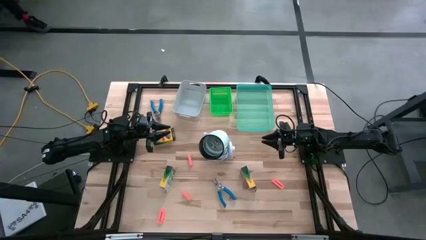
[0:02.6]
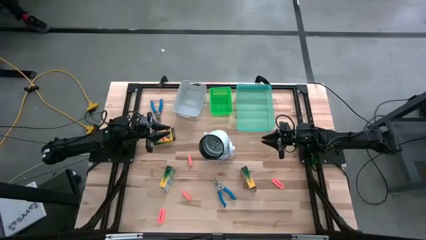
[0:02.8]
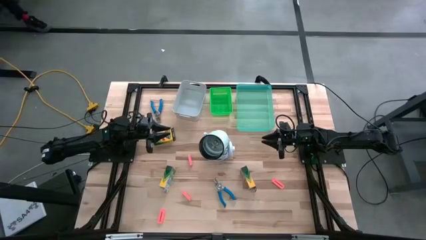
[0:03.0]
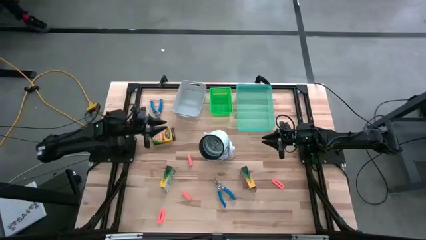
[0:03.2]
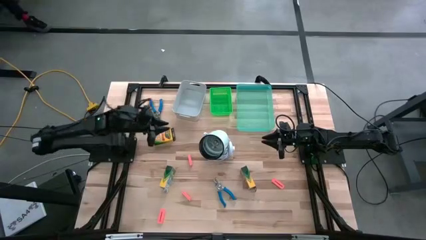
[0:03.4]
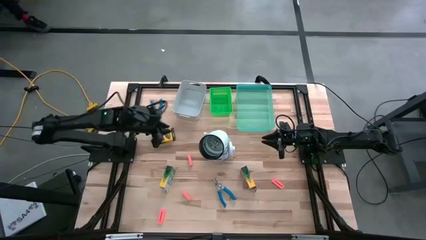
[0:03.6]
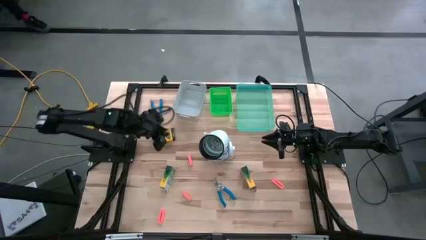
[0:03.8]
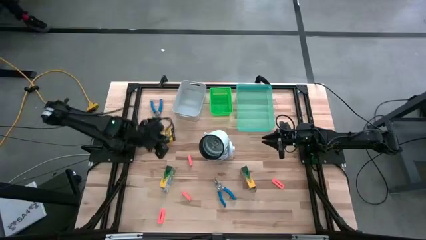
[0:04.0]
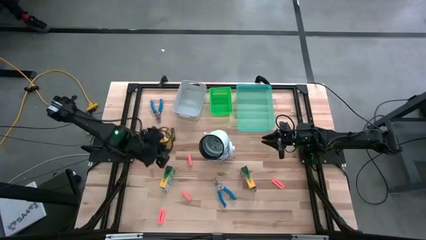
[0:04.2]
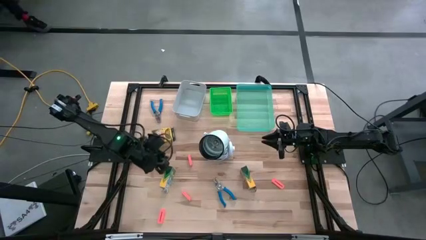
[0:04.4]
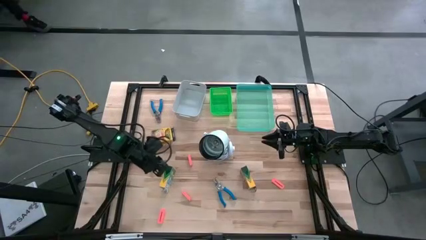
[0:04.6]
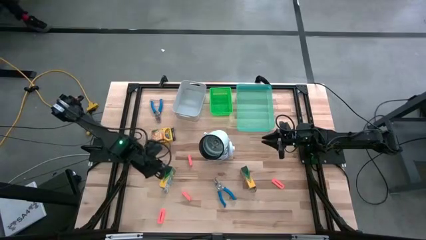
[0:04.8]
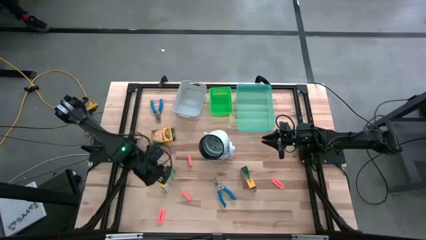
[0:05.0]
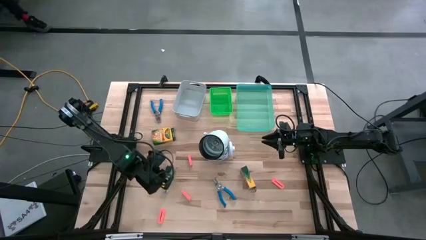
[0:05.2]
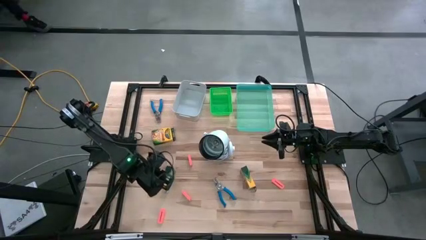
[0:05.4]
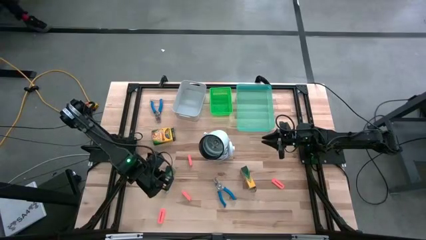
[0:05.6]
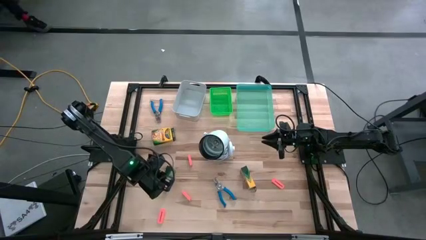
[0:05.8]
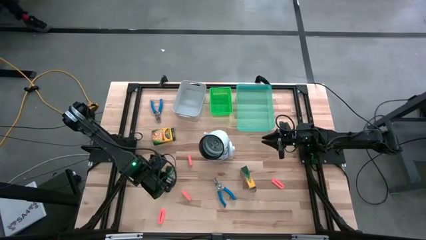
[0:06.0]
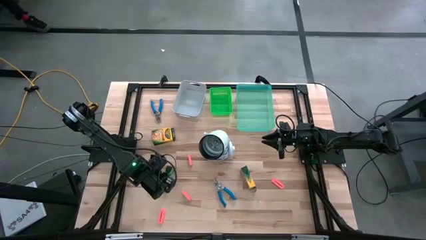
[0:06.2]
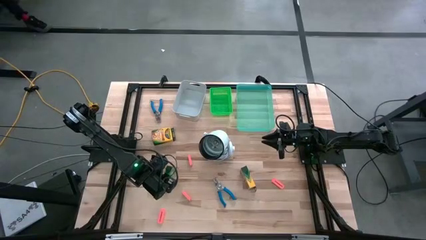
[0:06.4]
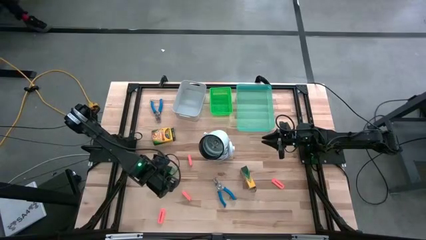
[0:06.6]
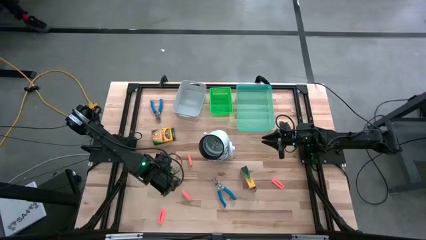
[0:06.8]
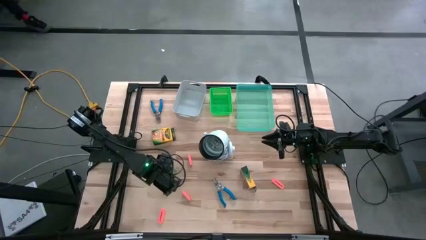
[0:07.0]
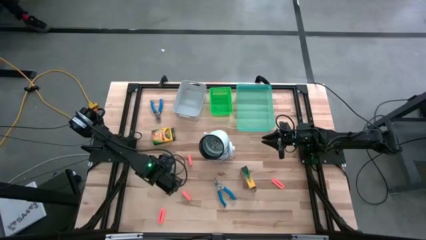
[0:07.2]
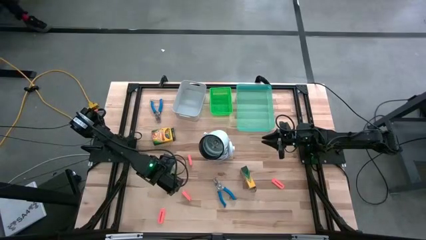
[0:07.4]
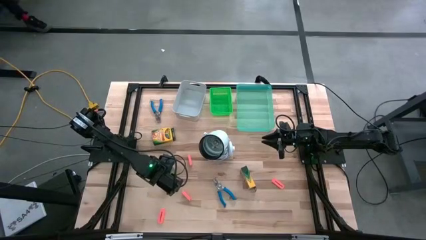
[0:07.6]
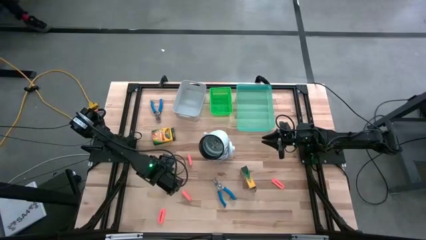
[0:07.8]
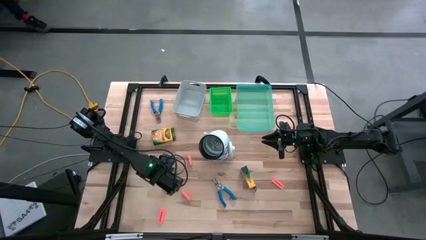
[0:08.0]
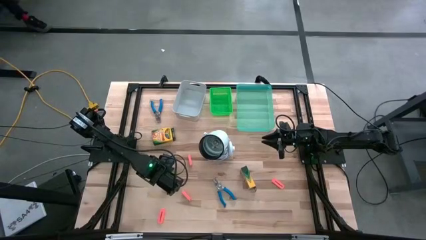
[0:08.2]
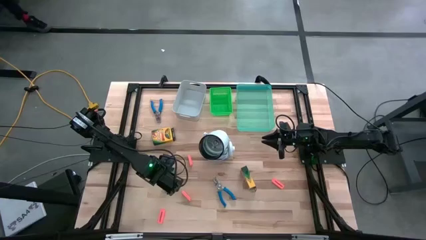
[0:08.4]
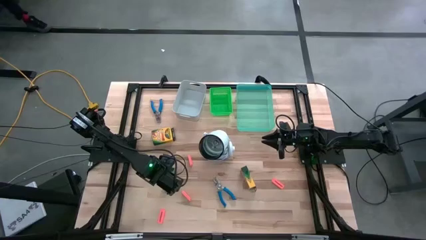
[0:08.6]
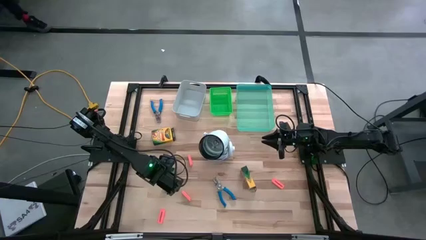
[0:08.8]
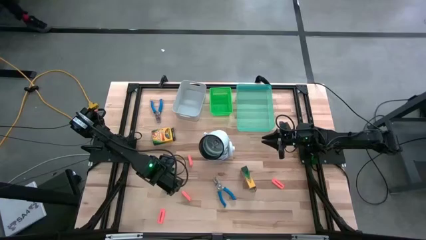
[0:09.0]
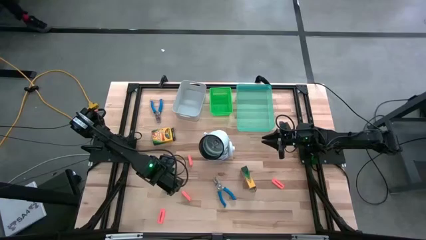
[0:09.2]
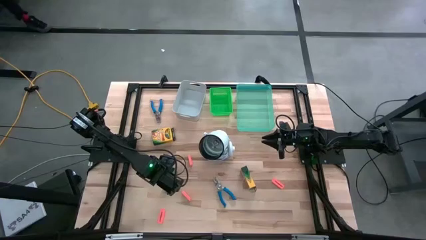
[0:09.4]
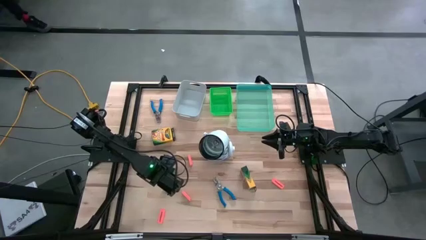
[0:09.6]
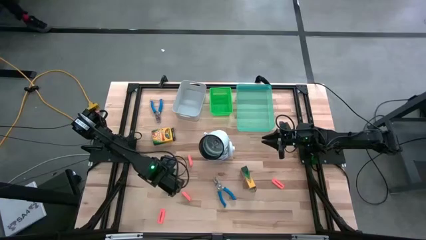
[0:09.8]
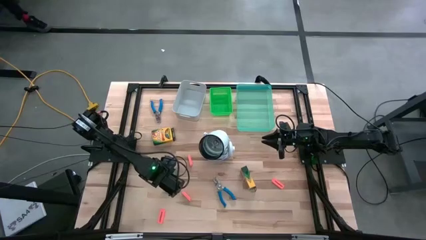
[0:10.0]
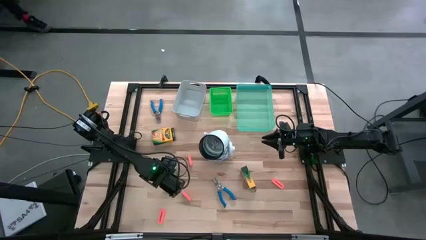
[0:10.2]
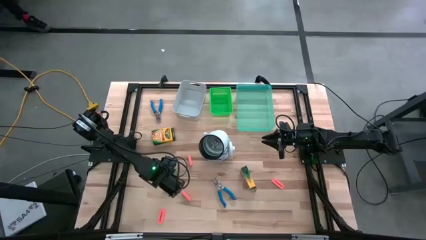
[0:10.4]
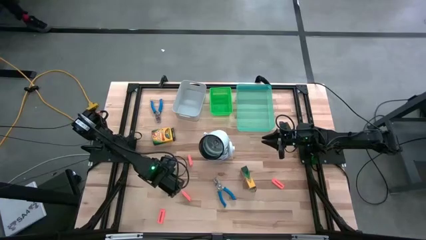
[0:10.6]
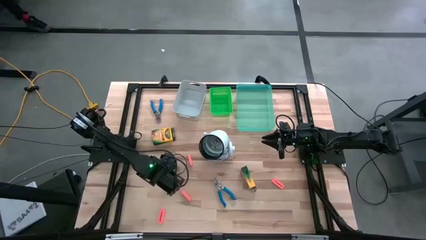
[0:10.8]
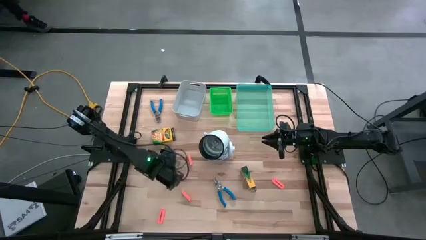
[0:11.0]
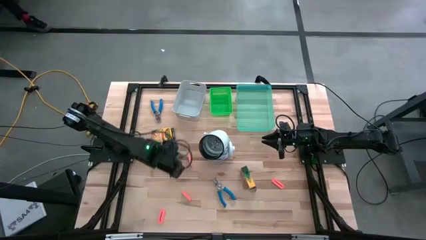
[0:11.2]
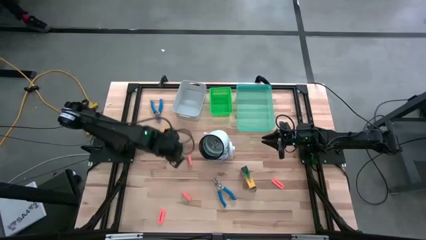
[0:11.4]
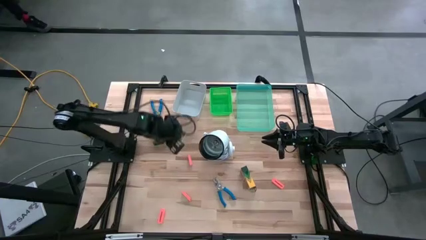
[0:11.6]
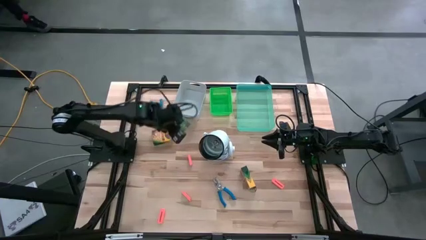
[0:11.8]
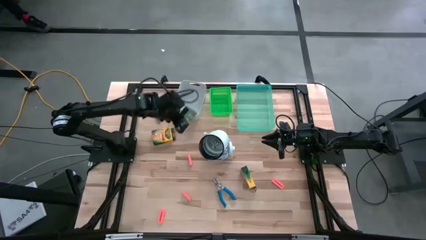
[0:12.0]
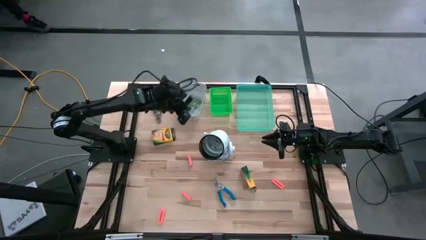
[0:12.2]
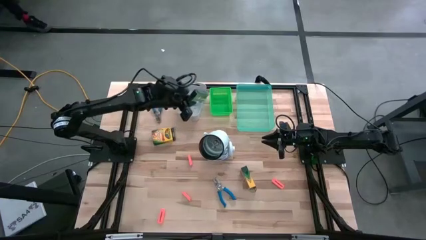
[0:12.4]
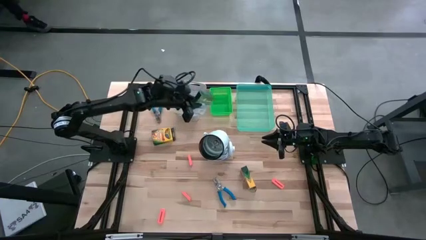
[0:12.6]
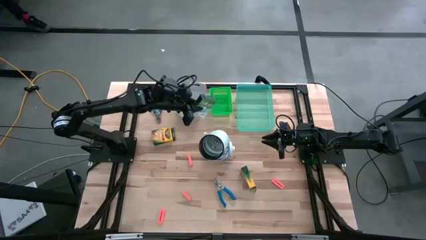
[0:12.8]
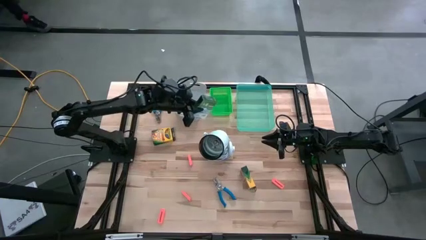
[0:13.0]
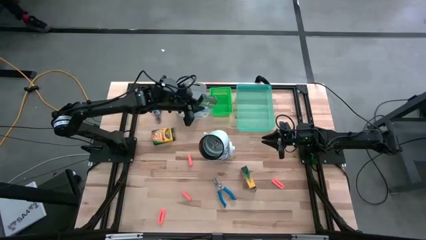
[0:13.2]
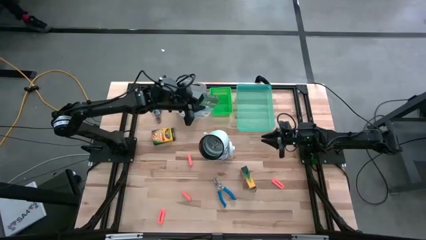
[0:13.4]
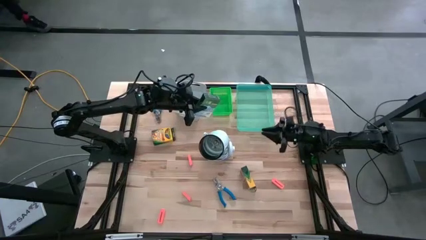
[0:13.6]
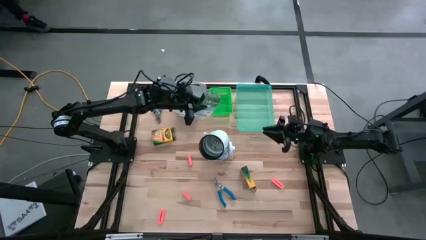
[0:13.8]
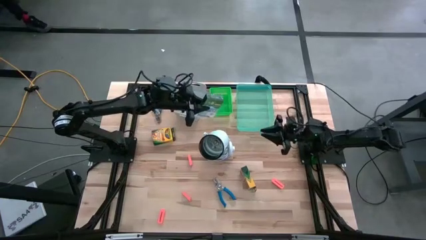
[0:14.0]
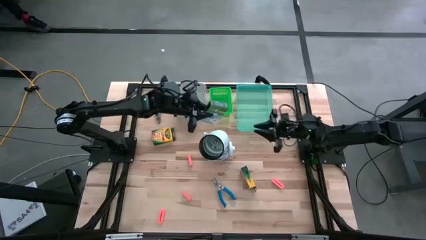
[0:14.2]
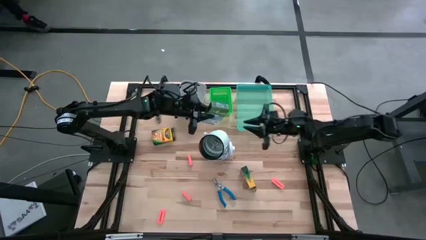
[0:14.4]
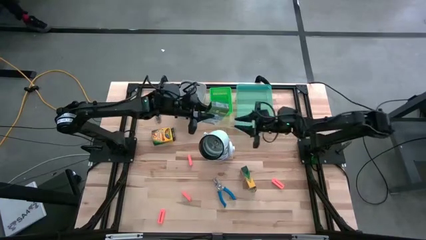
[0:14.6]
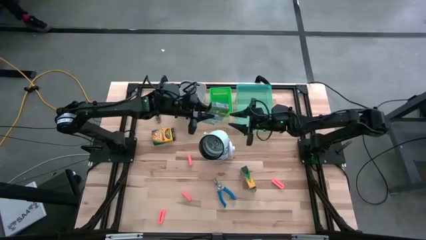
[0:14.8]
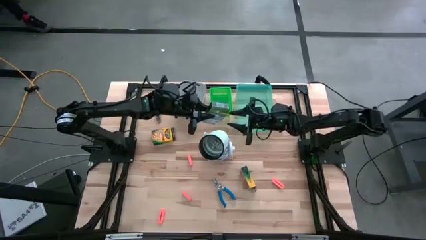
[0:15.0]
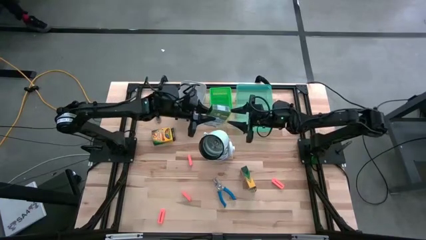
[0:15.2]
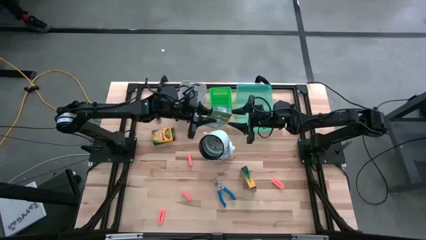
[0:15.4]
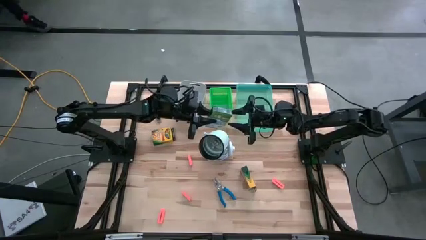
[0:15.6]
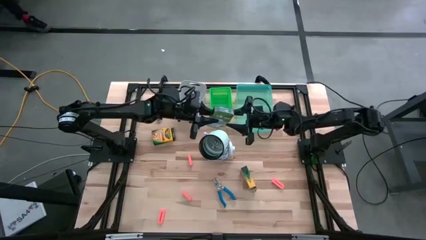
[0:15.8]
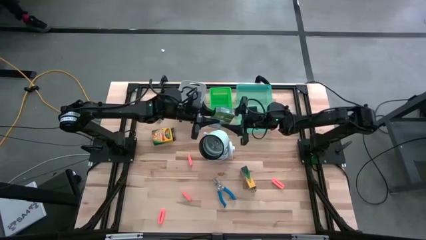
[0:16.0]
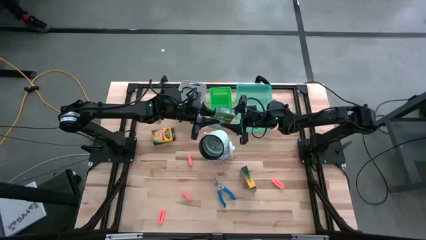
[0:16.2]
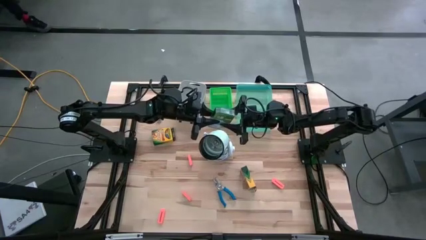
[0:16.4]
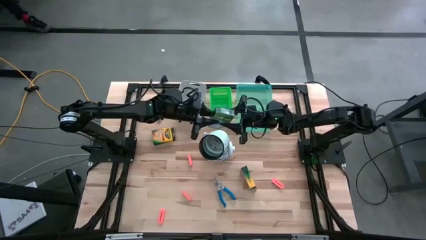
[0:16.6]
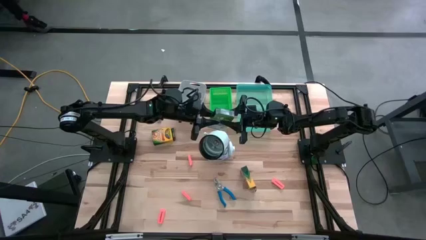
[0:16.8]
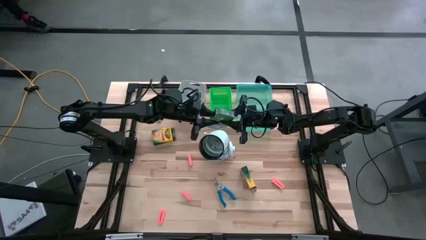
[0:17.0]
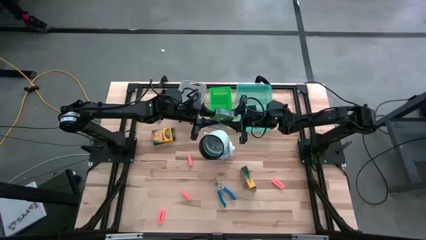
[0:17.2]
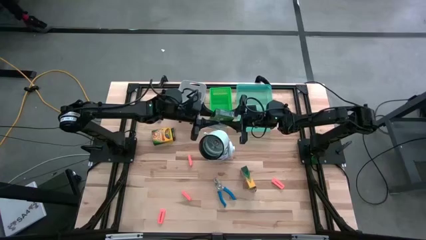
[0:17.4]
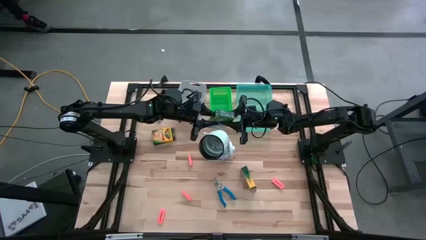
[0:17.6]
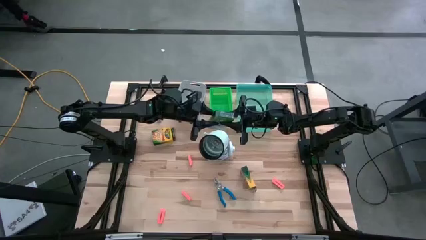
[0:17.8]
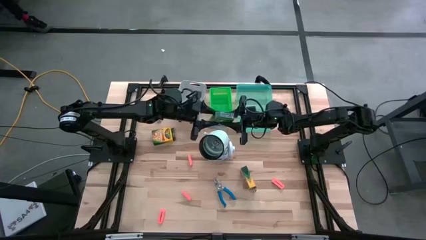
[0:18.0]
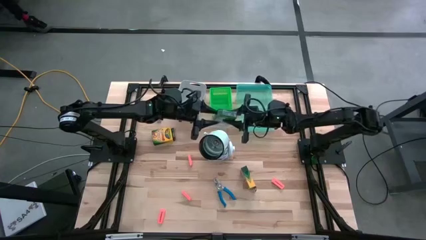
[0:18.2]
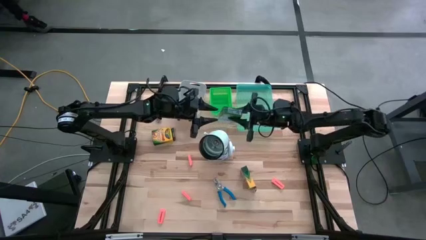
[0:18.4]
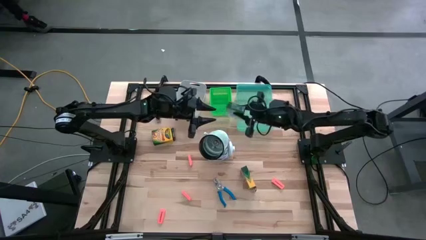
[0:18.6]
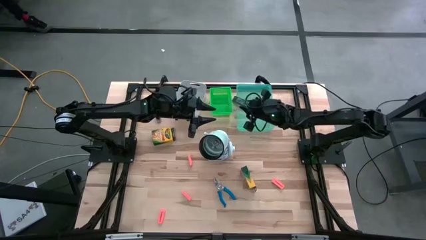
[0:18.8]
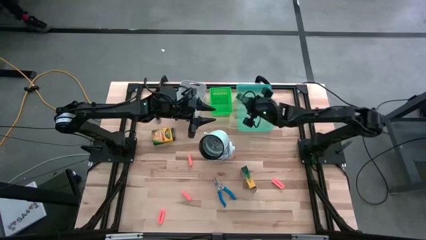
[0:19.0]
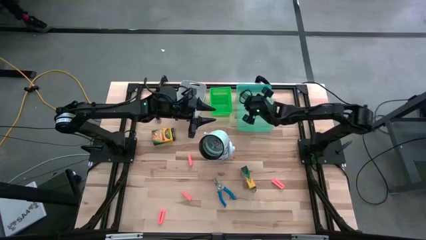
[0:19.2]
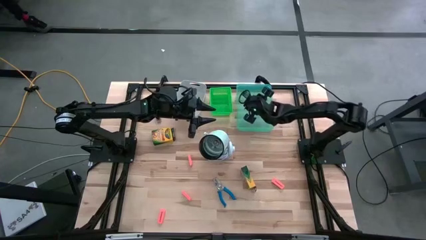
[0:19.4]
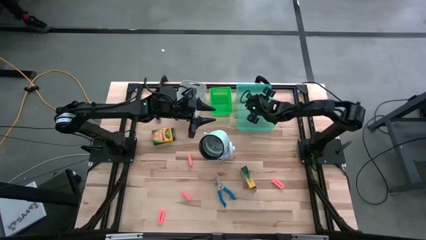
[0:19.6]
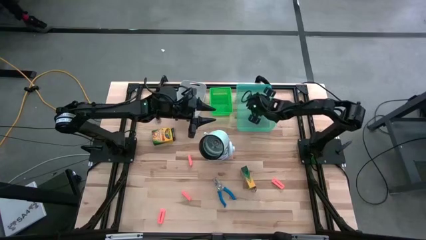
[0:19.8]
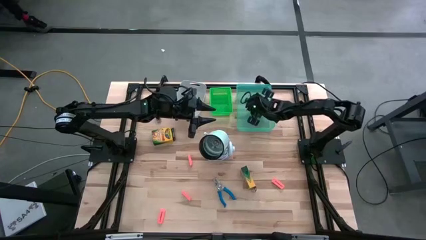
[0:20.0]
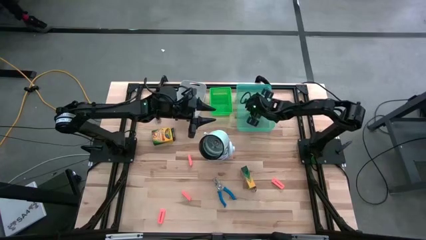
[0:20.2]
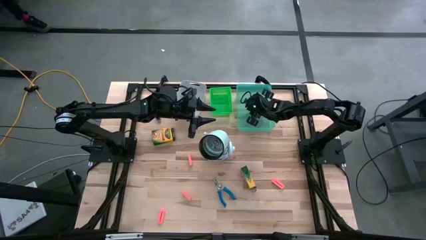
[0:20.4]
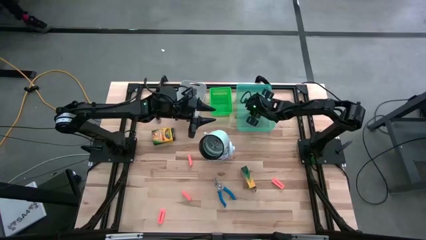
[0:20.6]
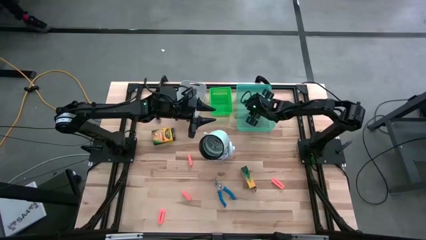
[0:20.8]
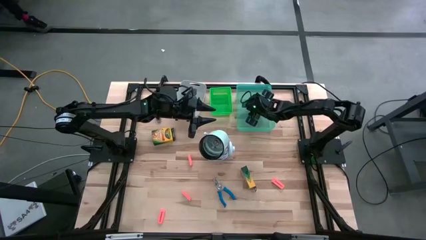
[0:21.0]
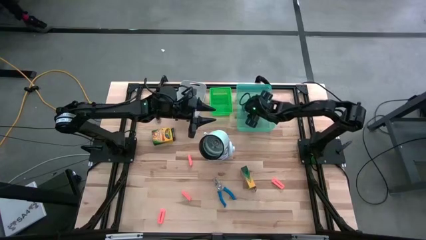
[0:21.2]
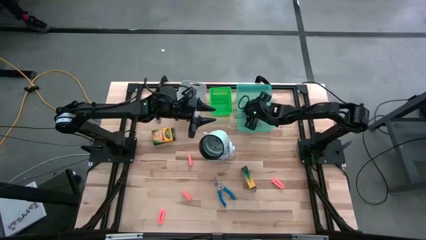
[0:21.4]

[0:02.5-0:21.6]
Task: Pick & Place School Supplies
Put the yellow crayon box into the blue bin
